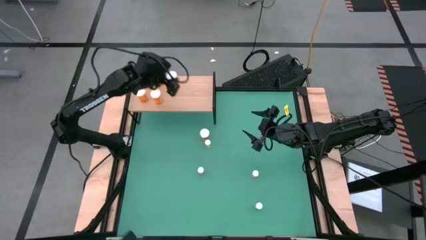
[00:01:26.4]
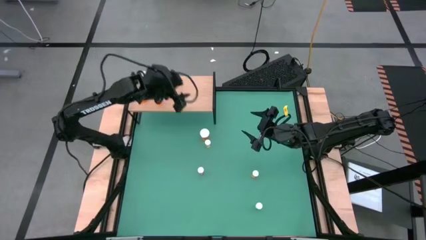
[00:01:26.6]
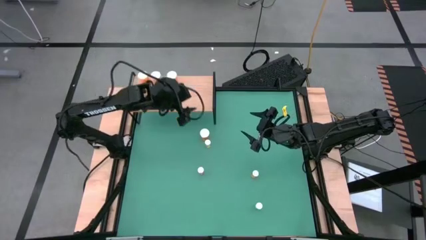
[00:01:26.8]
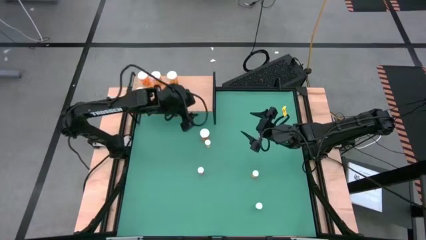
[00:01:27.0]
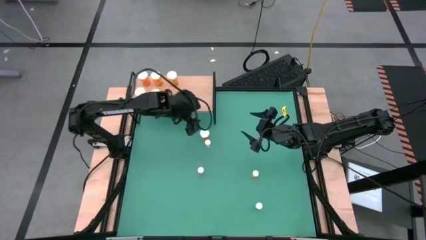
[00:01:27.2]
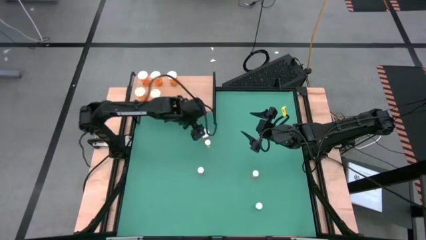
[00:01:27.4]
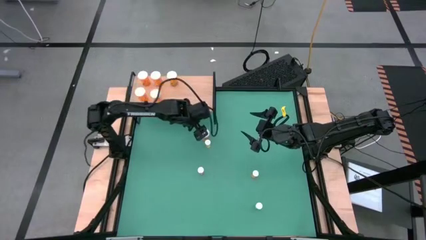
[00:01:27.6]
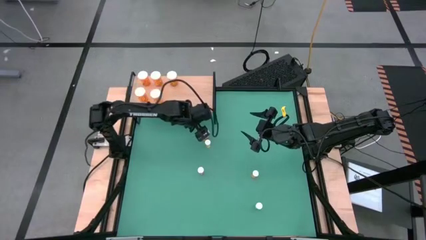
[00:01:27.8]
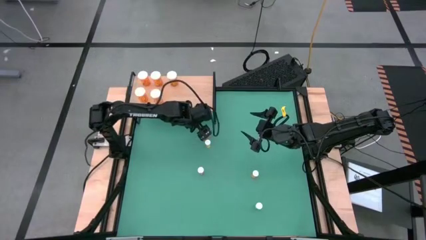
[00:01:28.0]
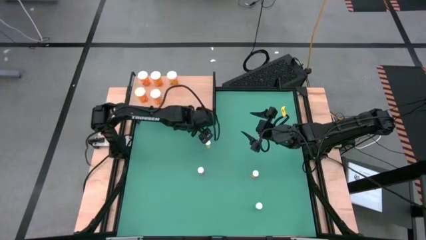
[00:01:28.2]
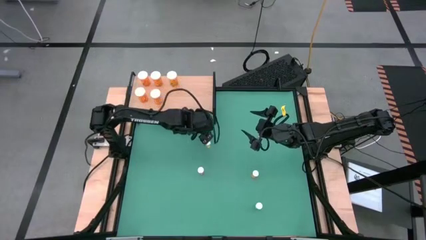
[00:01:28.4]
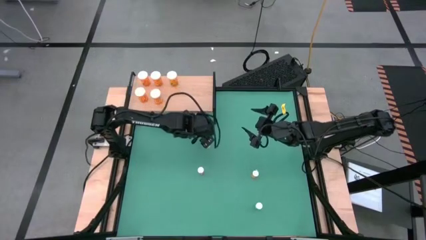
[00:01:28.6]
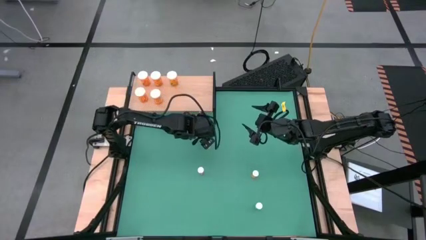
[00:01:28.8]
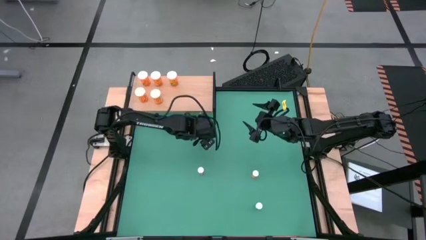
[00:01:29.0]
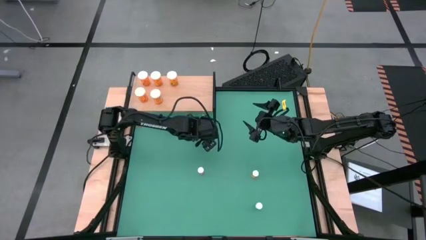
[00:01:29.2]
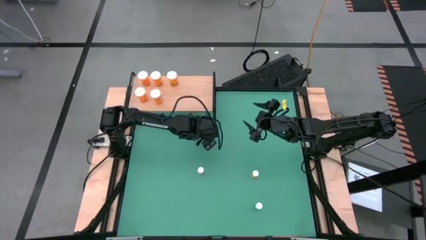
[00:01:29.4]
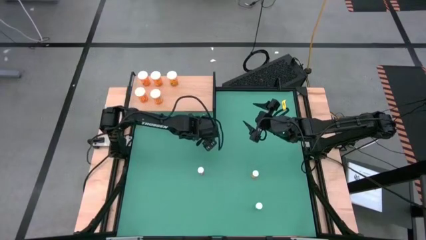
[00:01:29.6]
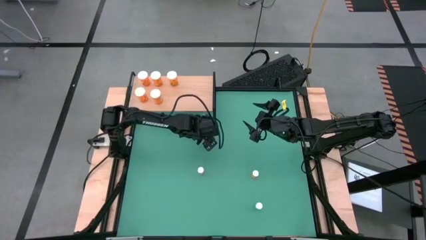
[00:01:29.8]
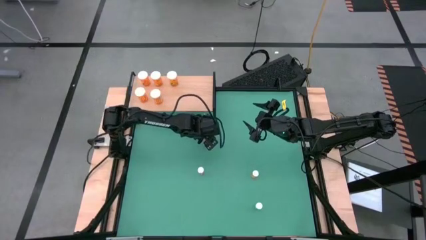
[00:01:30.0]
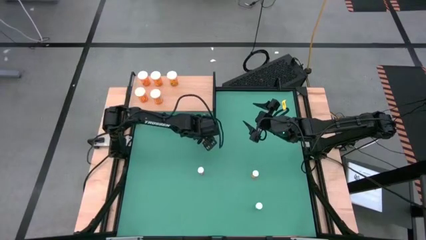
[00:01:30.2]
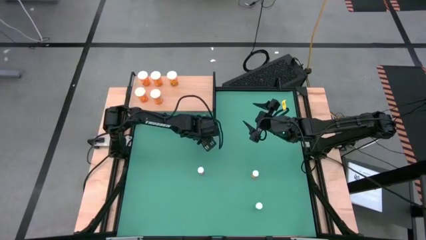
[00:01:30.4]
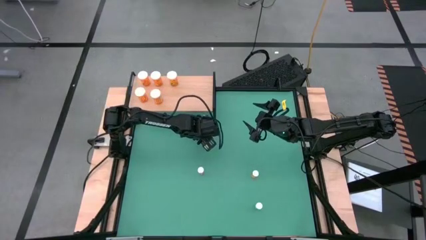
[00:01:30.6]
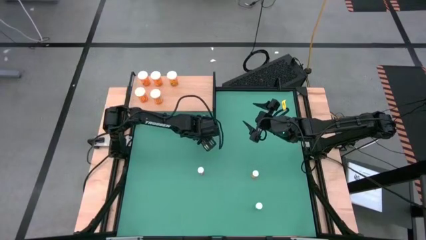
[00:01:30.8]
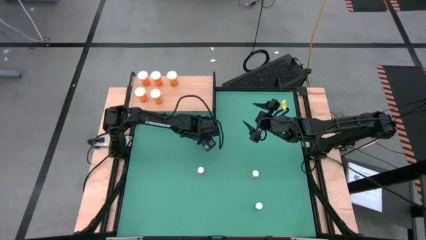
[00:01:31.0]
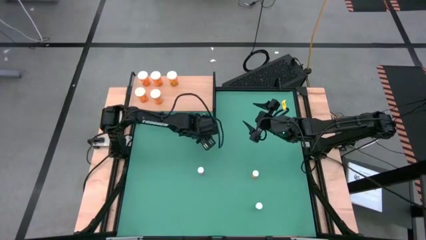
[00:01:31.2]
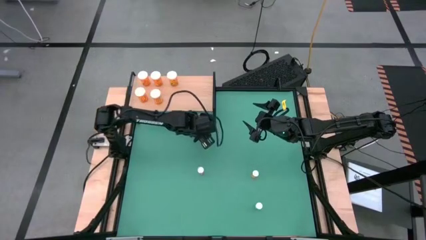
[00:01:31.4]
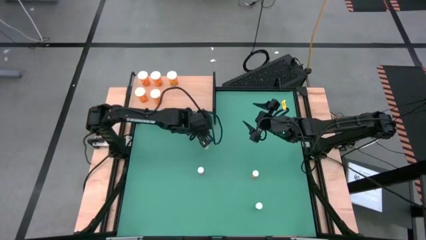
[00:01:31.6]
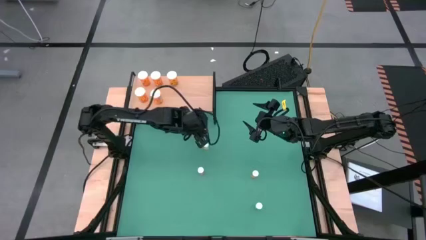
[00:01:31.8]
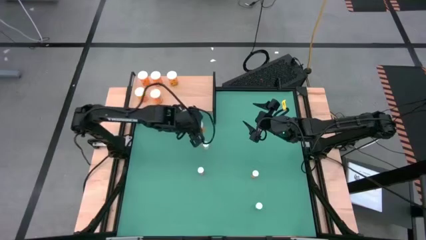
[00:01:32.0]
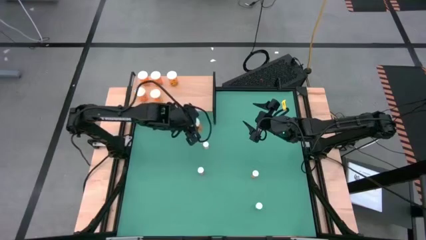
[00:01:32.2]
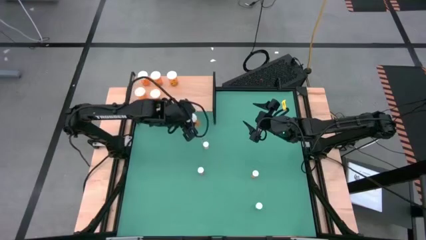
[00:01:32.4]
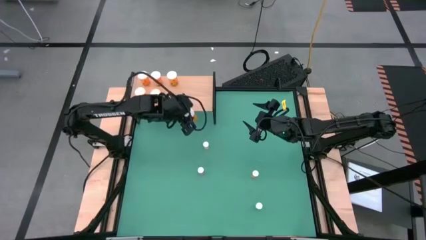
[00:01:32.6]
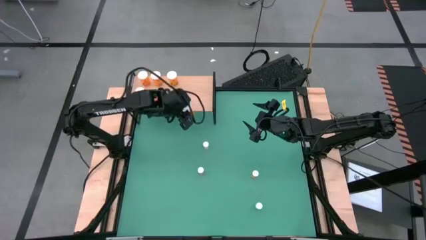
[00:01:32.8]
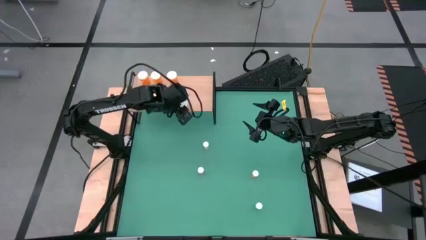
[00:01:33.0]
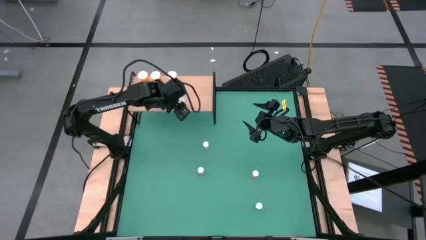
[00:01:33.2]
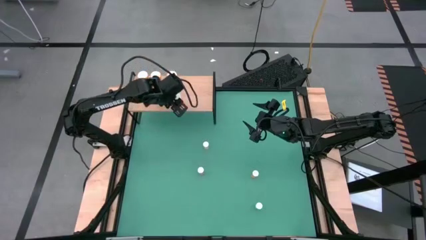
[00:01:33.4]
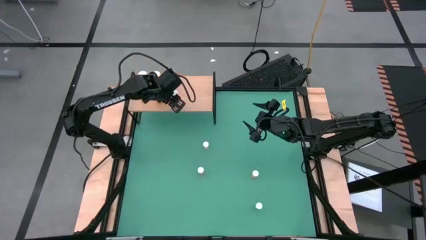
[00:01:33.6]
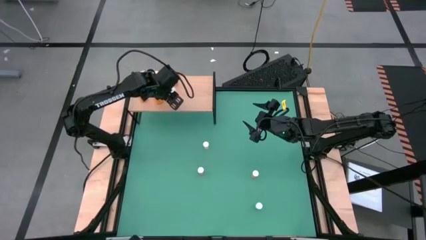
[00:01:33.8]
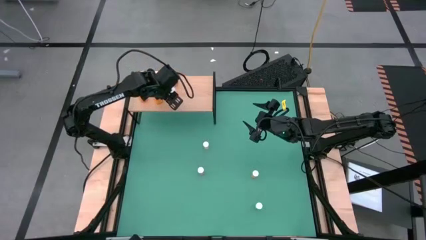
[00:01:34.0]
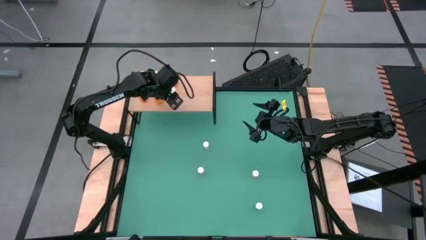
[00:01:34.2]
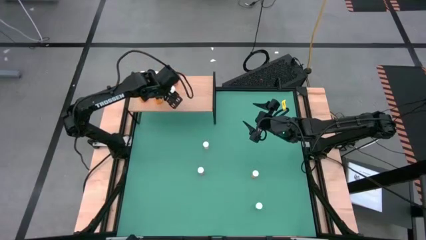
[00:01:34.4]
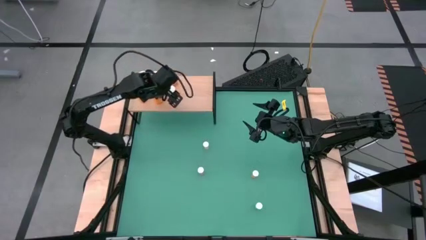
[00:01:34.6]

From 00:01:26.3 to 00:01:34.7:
Task: Pick and place medicine bottles onto shelf by color
Put the big orange pill bottle on the shelf aligned with the other big orange pill bottle

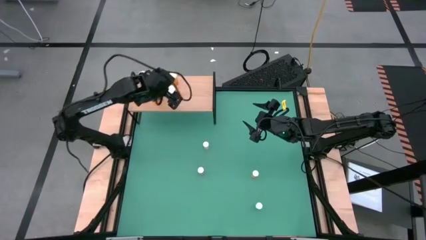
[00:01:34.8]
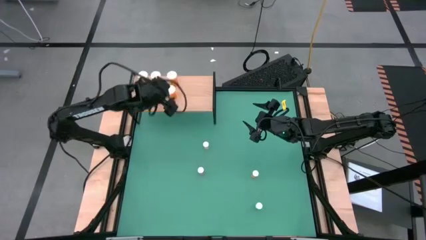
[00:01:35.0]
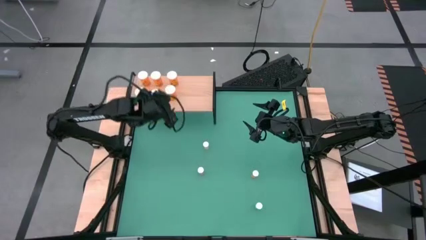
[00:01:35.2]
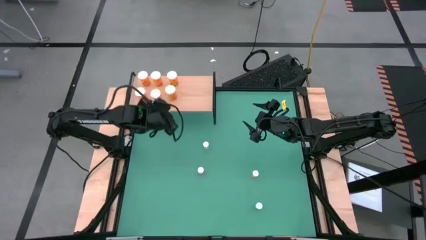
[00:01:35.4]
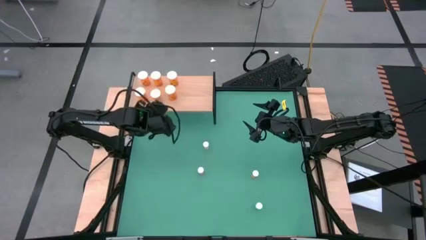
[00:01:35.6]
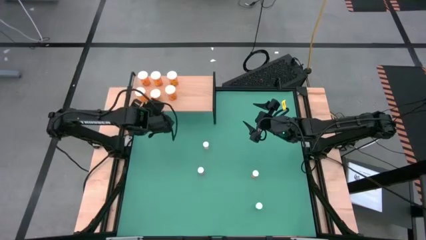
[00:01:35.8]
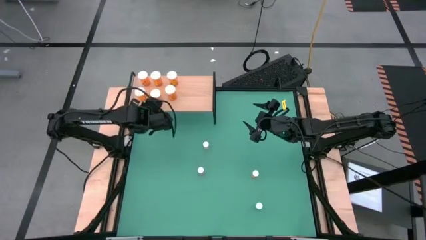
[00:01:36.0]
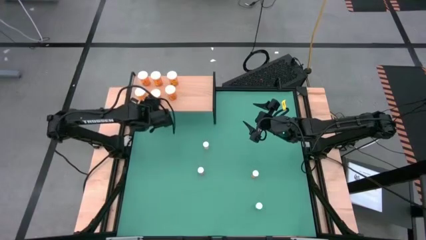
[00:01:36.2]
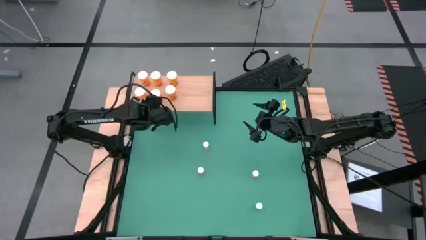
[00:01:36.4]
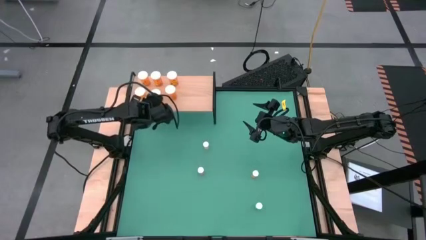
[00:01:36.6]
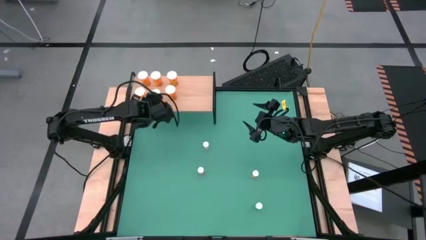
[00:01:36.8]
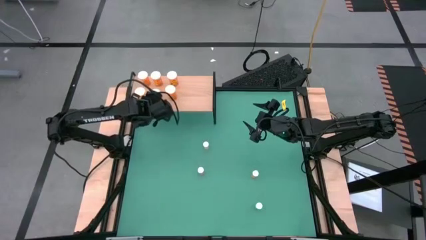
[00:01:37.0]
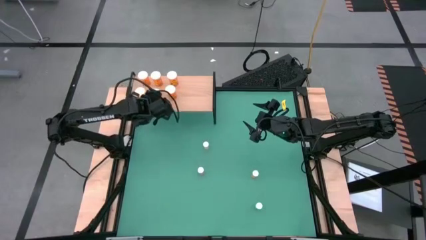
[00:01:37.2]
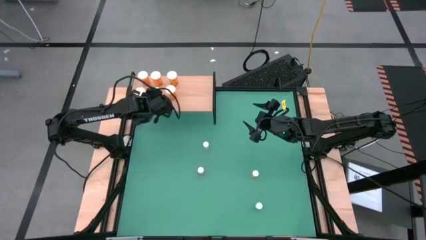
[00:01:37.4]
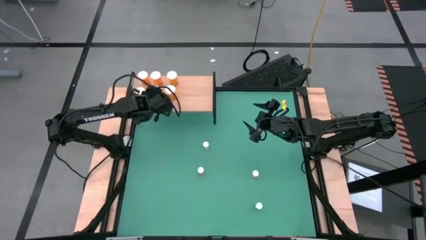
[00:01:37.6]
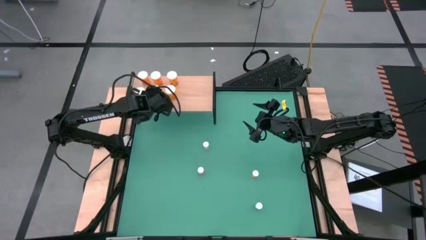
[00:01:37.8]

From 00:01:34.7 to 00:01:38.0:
Adjust the pill bottles on the shelf

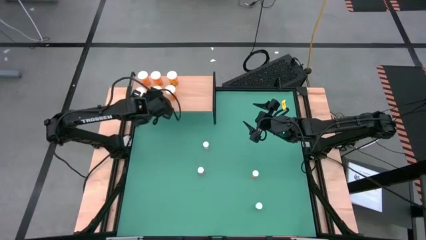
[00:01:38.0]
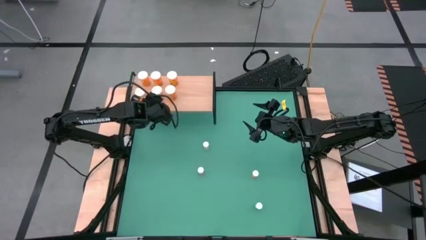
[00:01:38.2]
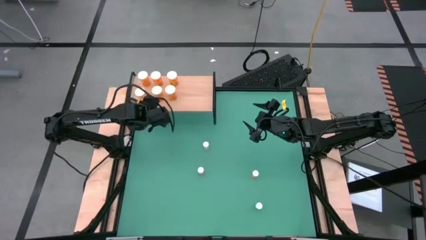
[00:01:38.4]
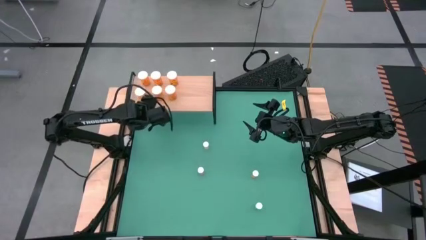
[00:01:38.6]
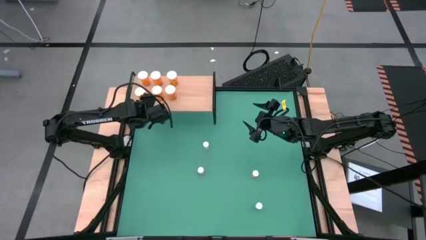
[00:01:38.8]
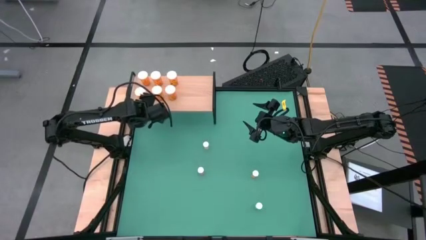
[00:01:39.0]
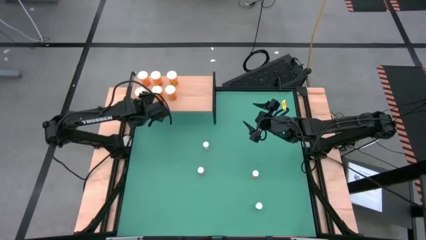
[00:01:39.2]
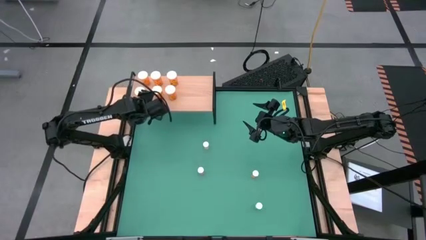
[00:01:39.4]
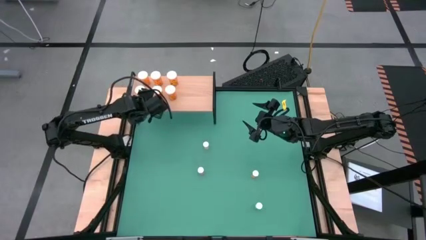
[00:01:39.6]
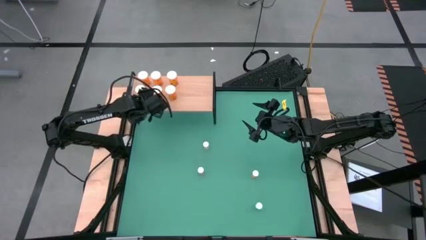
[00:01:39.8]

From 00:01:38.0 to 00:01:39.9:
Adjust the big orange pill bottle
